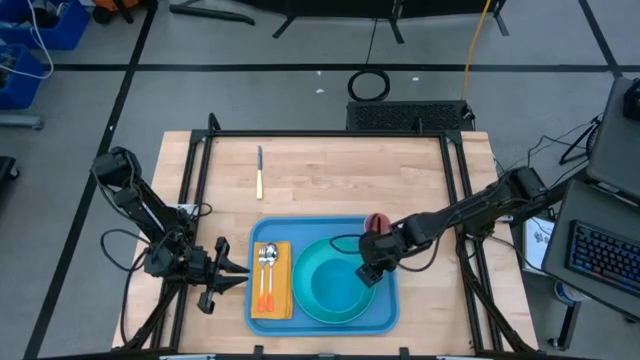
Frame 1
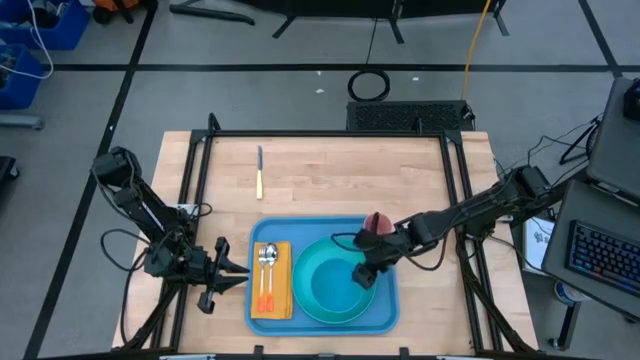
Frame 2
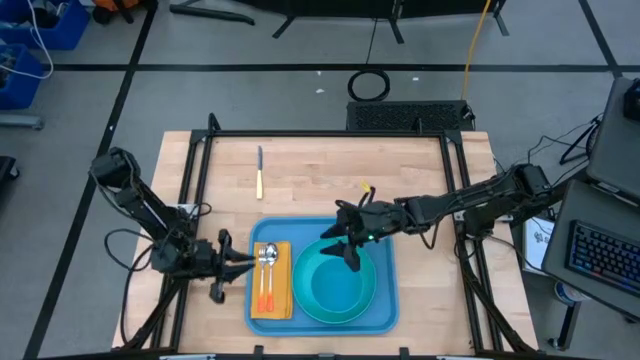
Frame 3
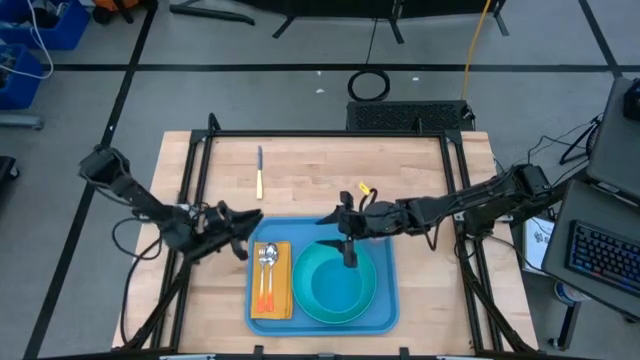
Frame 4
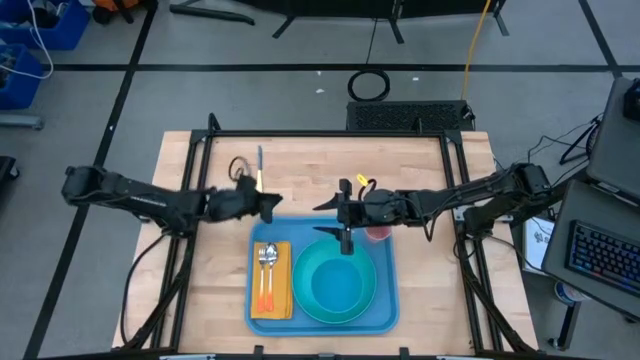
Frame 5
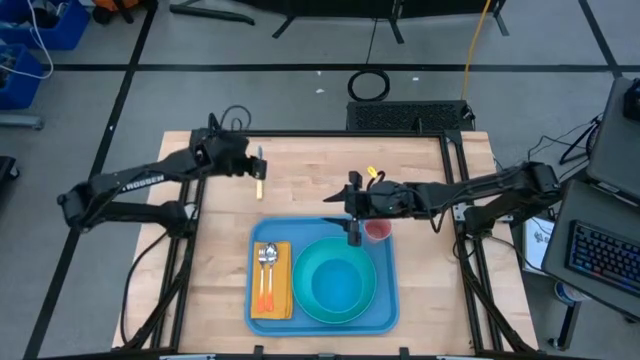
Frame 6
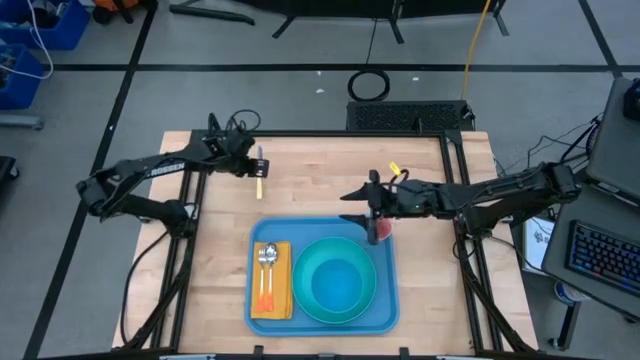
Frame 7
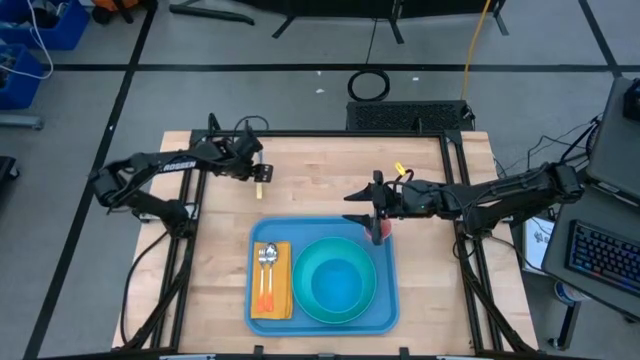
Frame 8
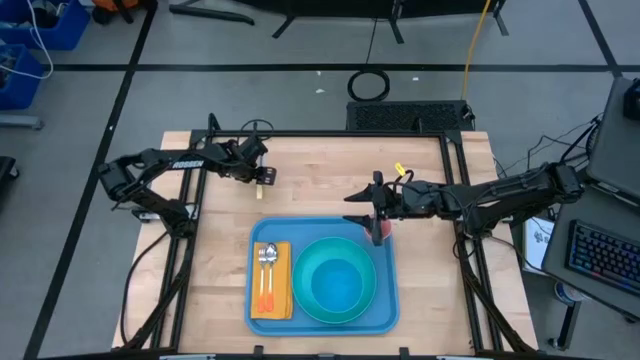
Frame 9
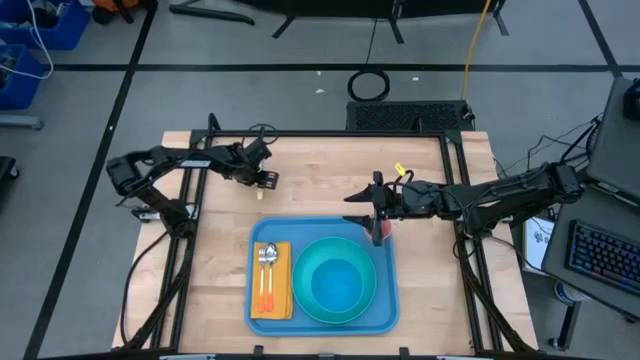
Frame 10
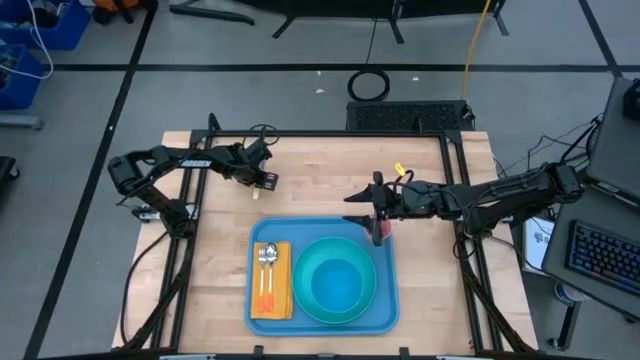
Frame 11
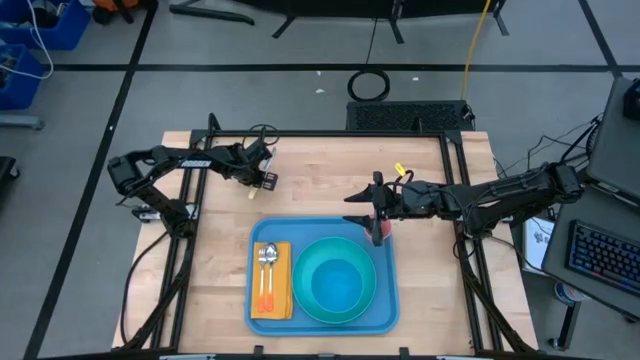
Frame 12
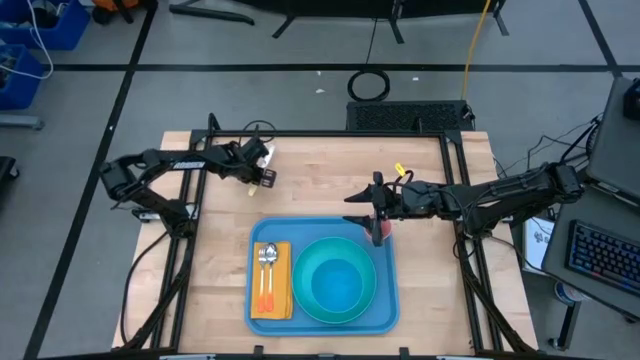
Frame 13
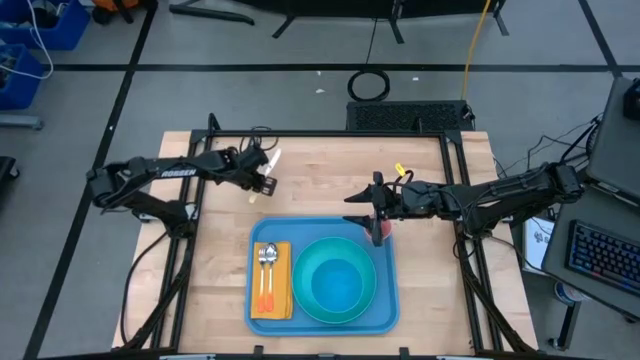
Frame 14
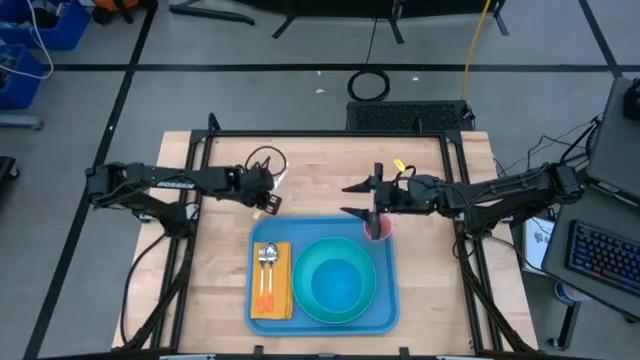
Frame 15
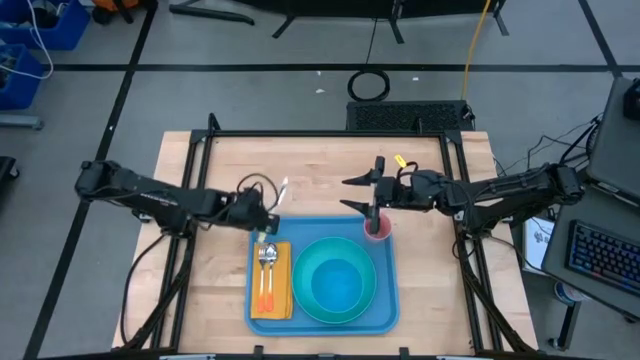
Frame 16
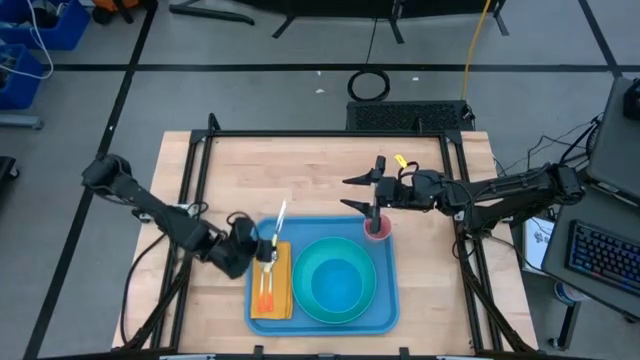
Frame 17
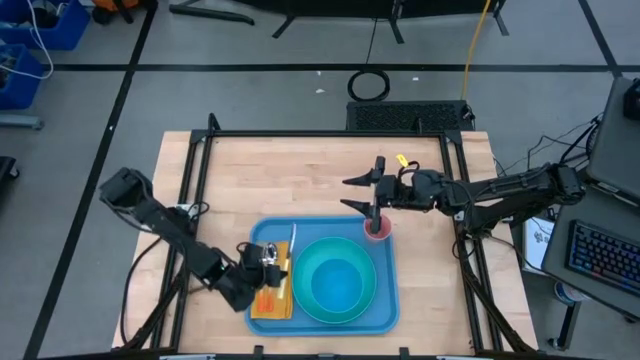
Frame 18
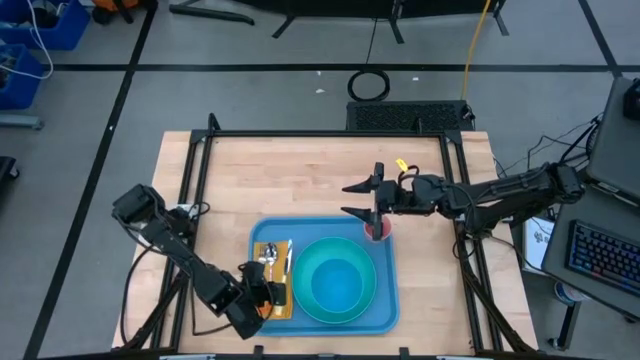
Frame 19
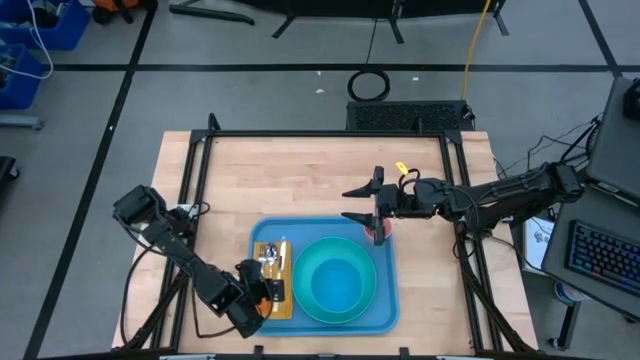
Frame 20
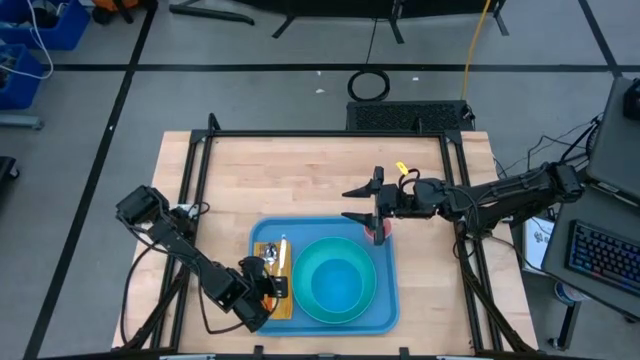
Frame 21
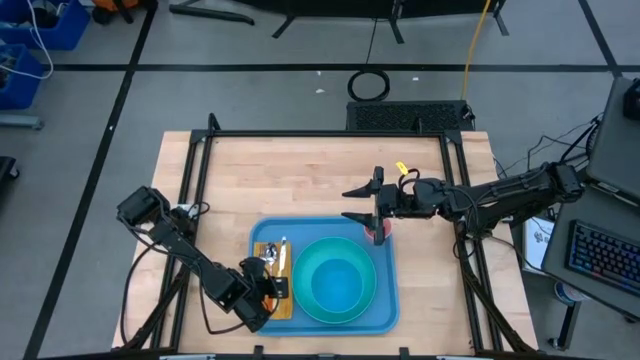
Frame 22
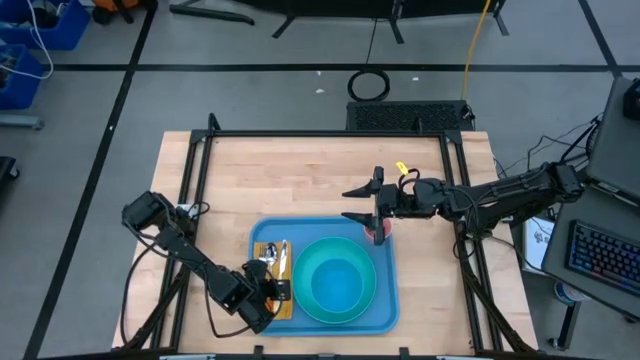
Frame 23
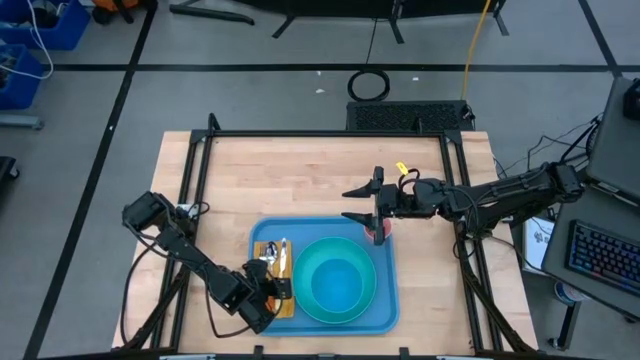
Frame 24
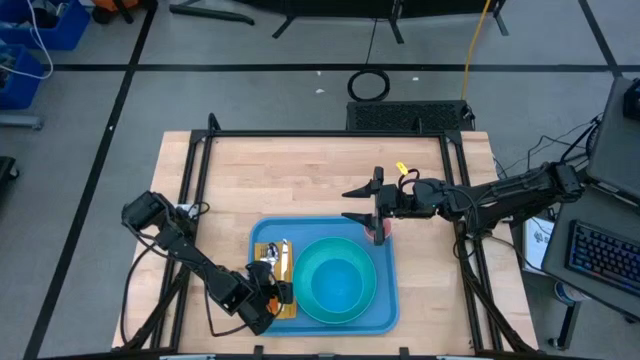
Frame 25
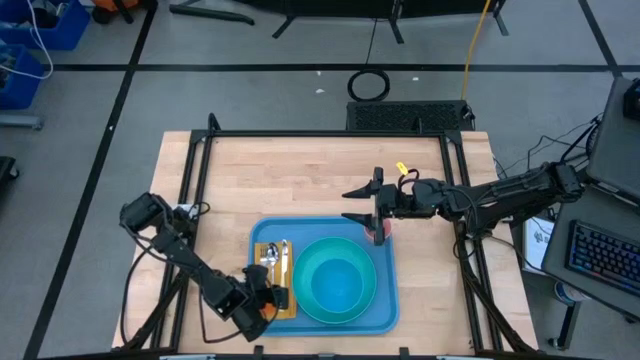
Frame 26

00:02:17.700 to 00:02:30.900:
Task: Set up tray
Put the light yellow knife on top of the yellow napkin

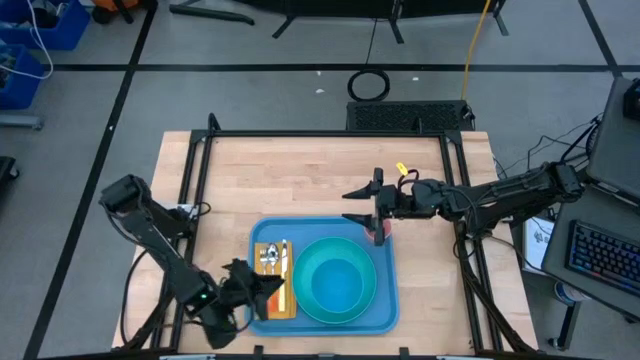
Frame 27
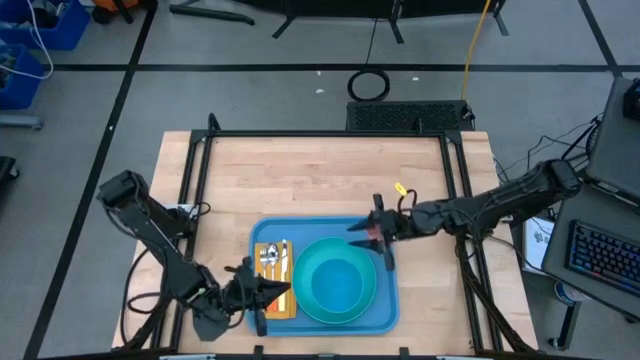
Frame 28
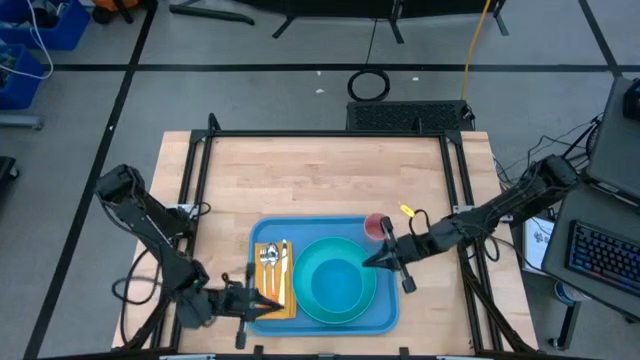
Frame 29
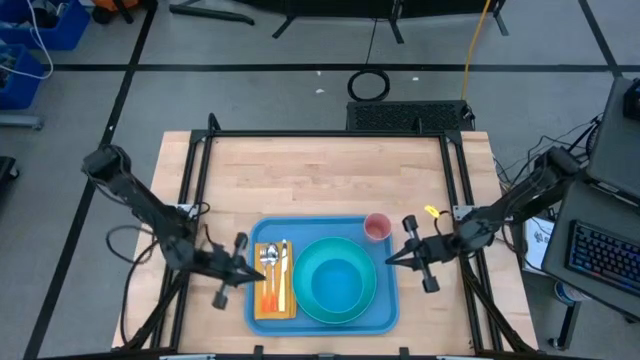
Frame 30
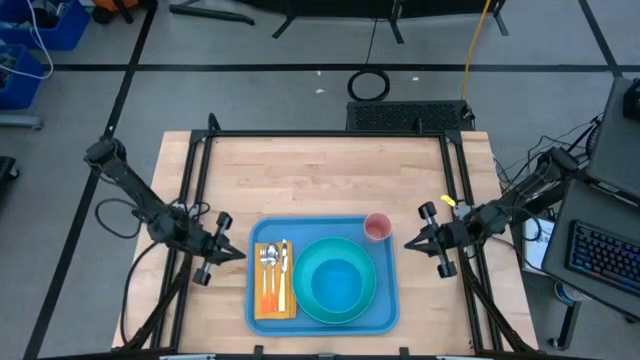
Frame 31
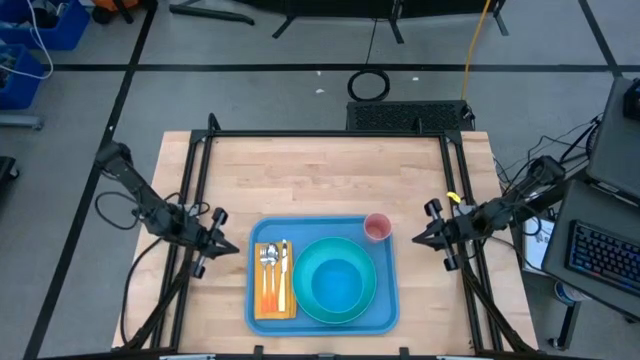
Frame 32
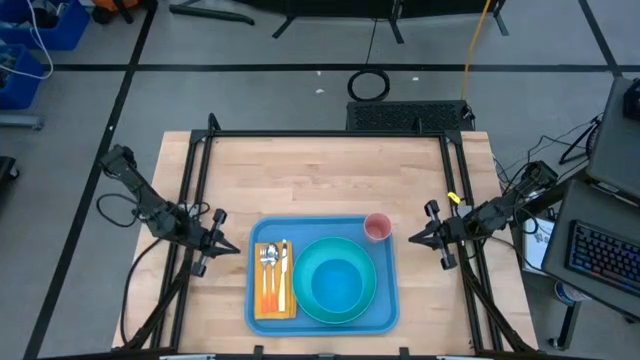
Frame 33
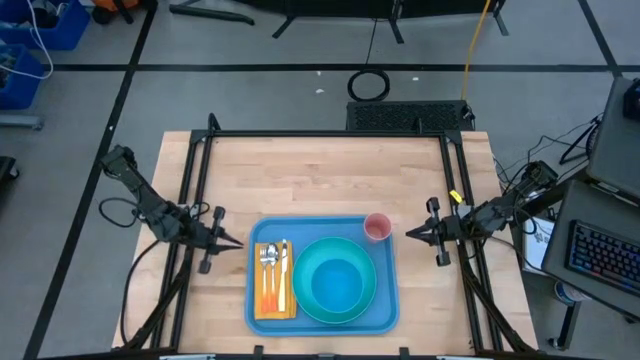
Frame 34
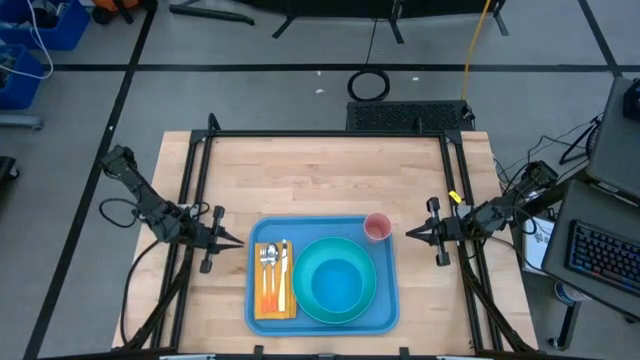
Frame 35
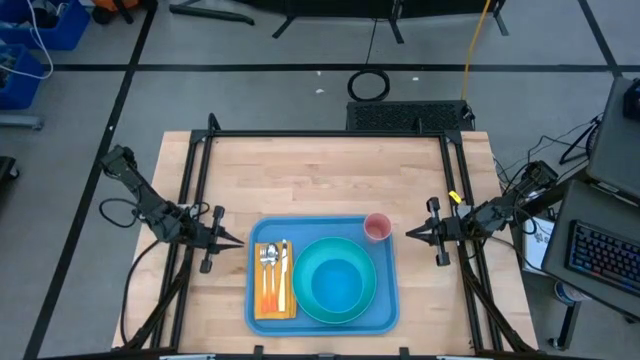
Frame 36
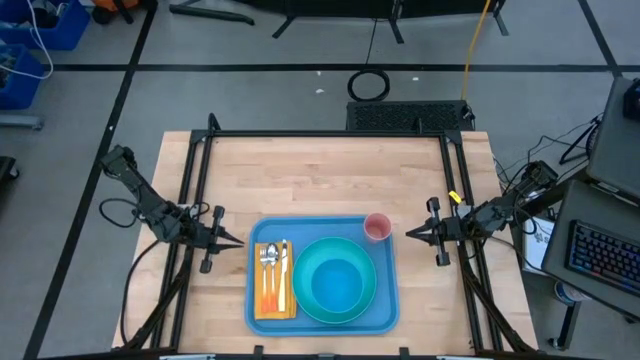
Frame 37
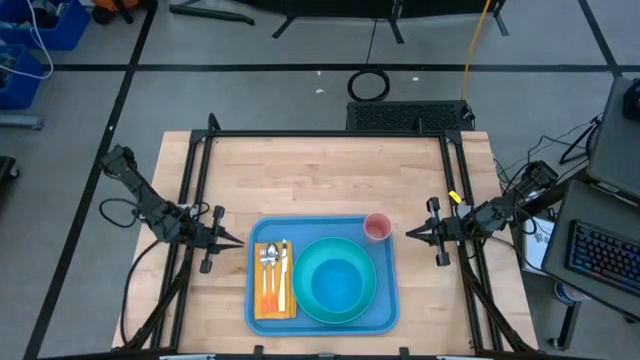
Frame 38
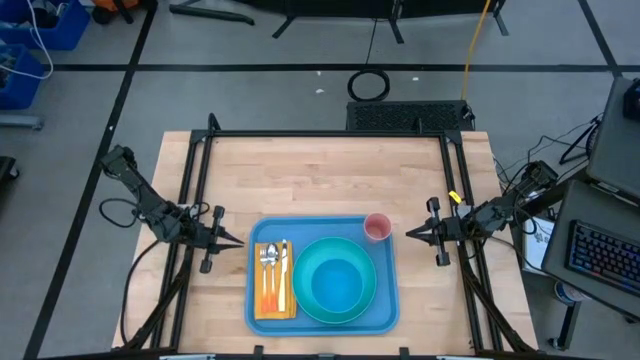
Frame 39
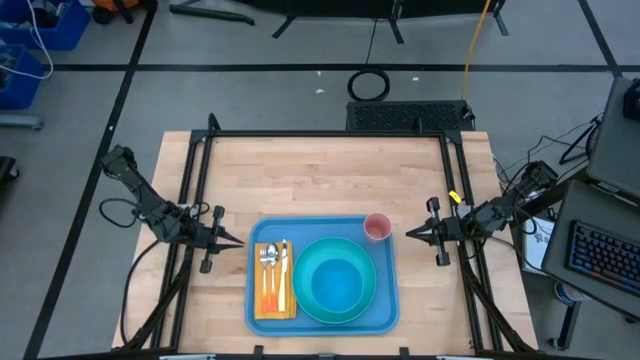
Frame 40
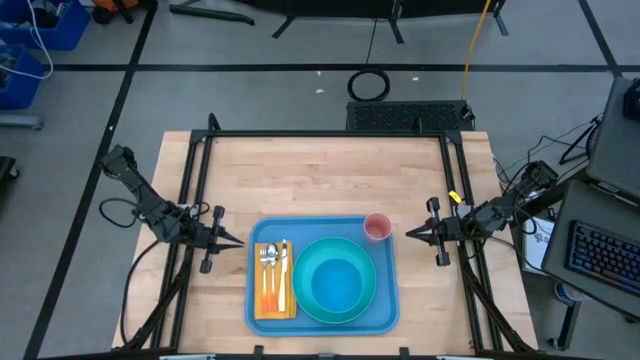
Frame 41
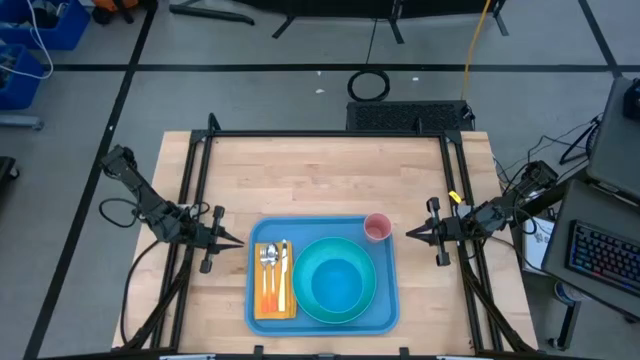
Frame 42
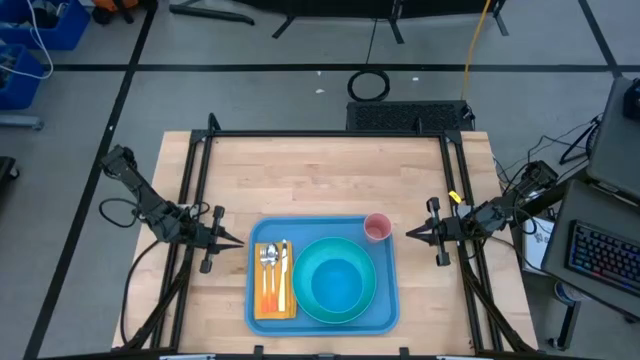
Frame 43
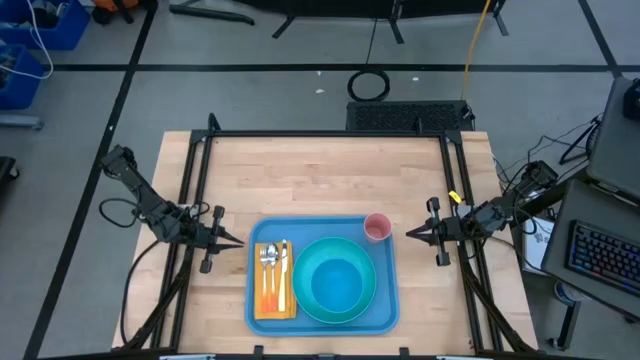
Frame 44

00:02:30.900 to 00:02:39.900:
Return to Home Position

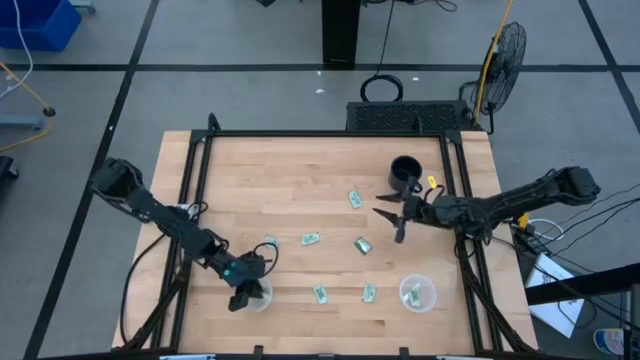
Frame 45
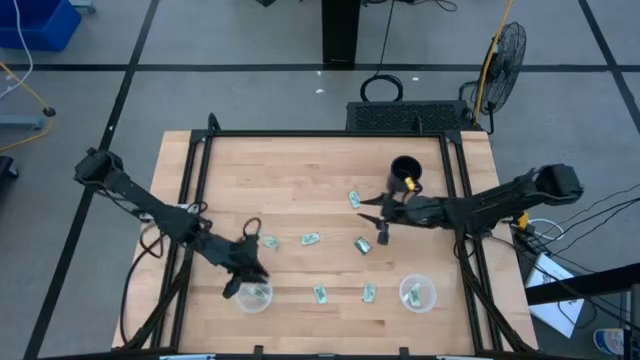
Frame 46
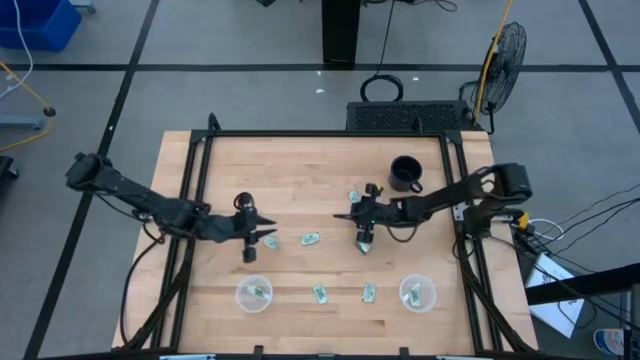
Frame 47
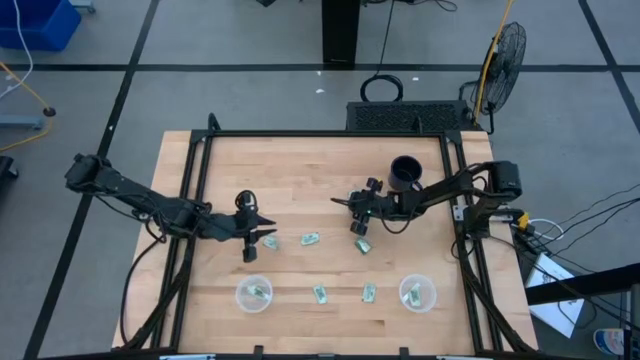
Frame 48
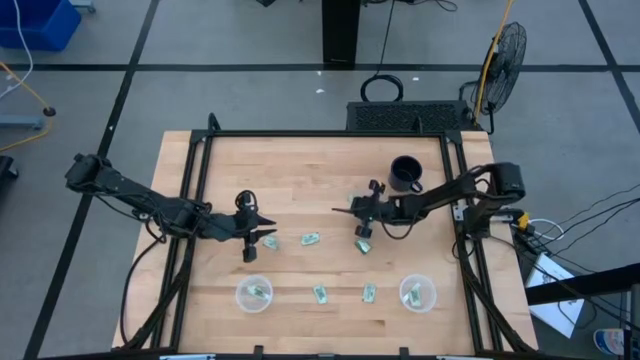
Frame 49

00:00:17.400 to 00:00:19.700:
Task: Pick and place Stevia / Truvia into bins
Put the stevia packet into the right transparent container
